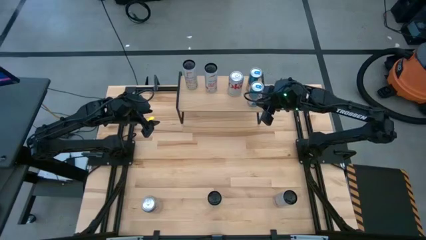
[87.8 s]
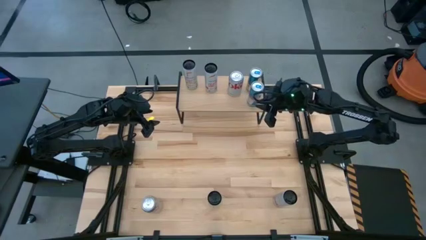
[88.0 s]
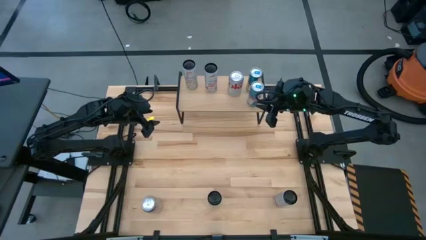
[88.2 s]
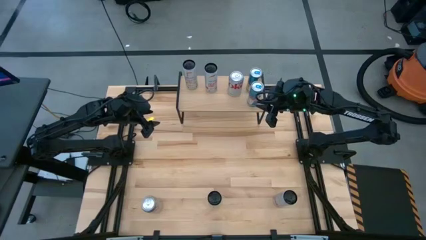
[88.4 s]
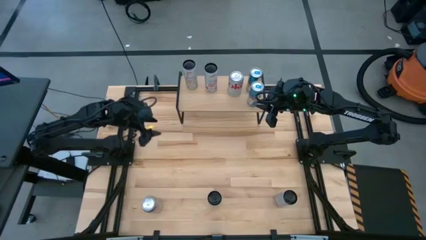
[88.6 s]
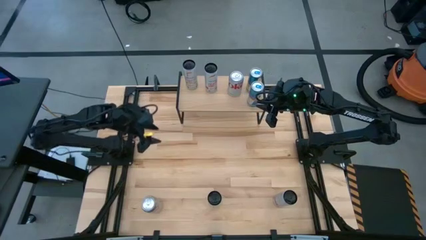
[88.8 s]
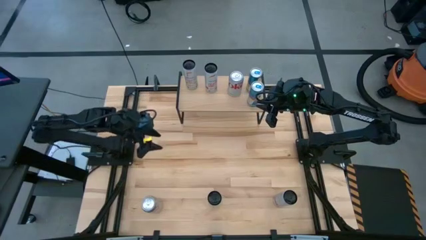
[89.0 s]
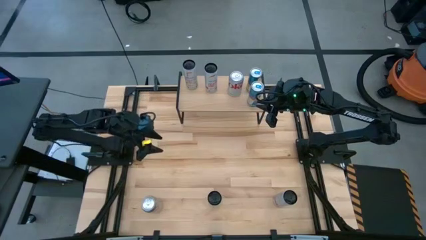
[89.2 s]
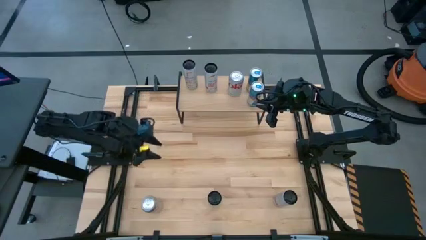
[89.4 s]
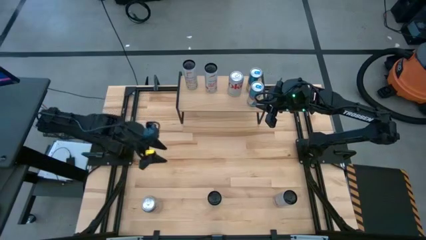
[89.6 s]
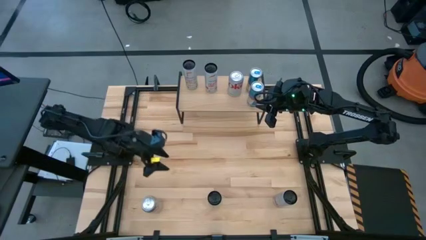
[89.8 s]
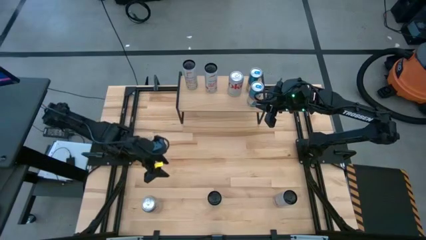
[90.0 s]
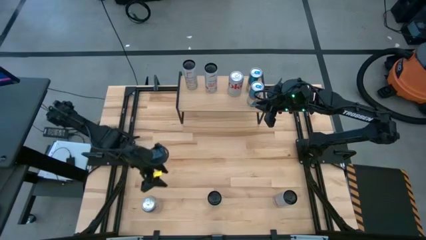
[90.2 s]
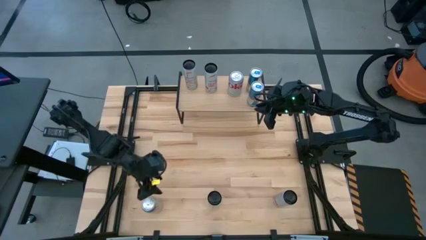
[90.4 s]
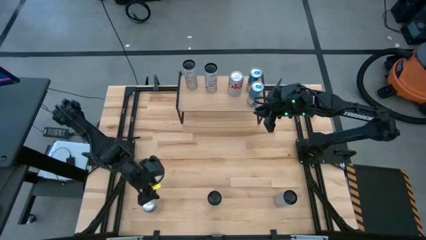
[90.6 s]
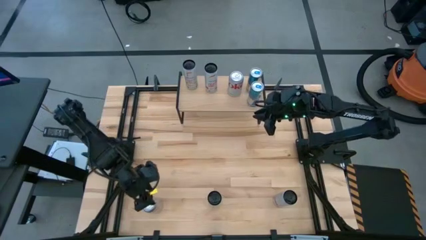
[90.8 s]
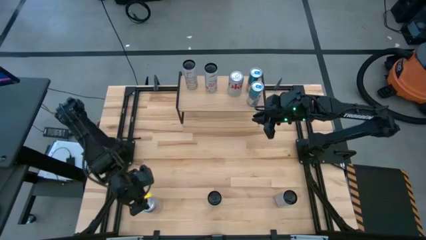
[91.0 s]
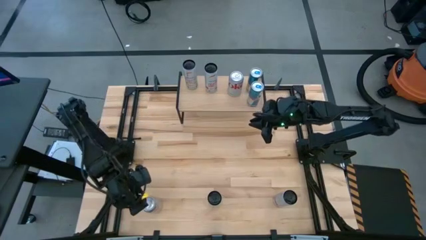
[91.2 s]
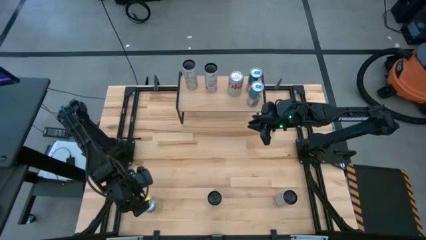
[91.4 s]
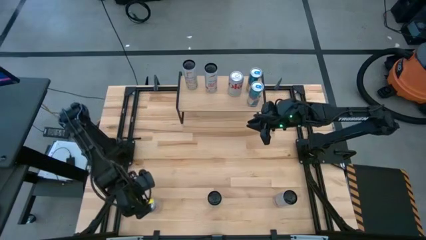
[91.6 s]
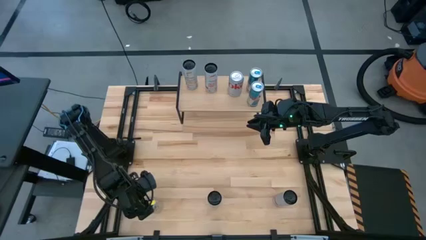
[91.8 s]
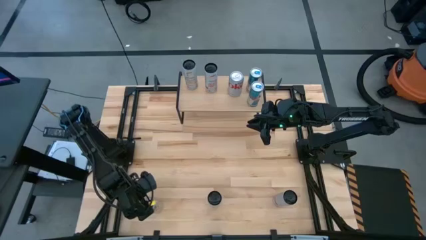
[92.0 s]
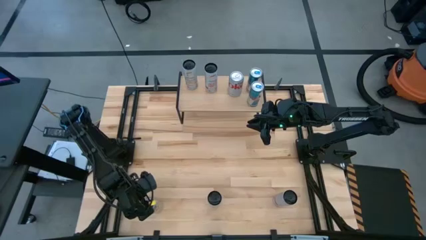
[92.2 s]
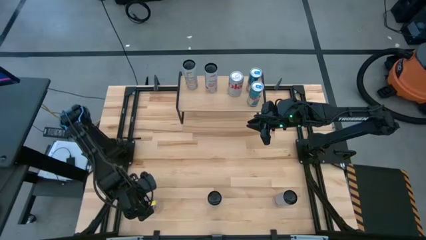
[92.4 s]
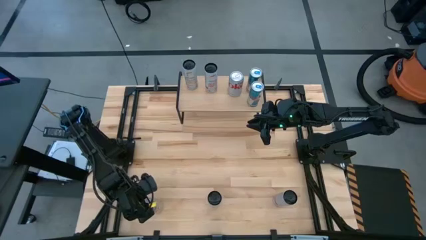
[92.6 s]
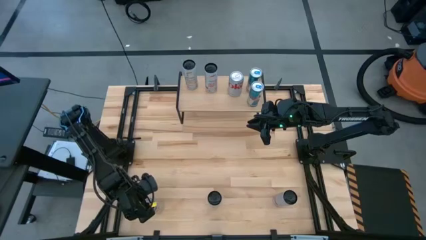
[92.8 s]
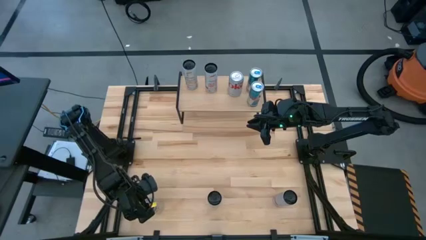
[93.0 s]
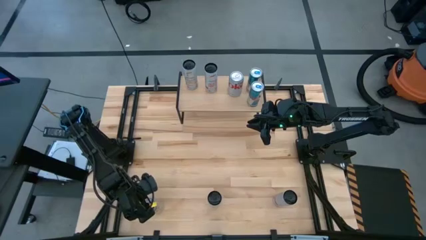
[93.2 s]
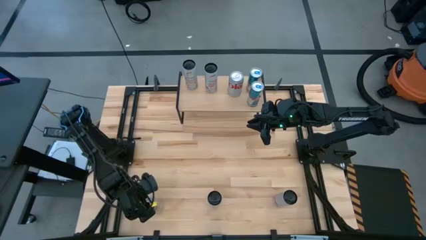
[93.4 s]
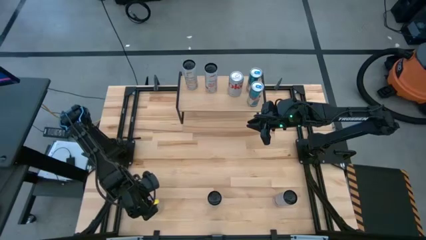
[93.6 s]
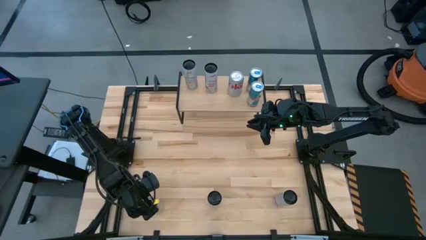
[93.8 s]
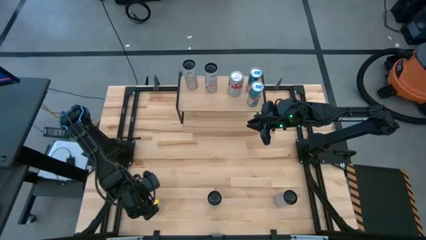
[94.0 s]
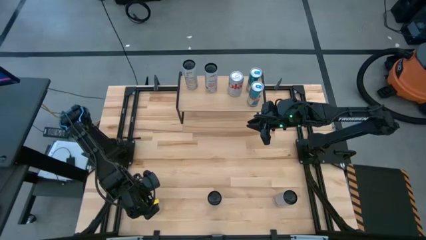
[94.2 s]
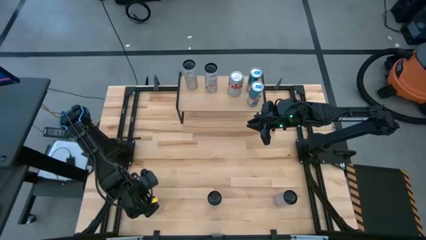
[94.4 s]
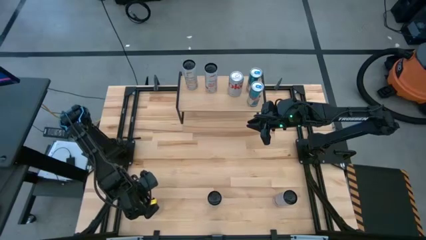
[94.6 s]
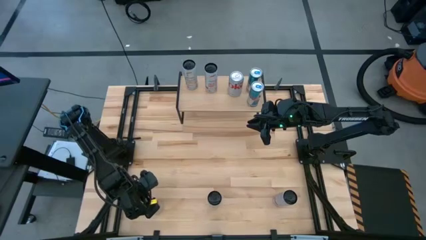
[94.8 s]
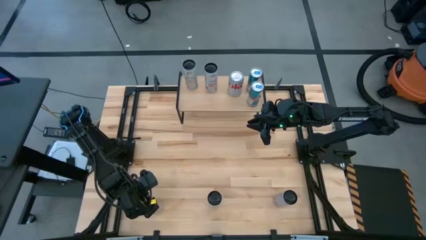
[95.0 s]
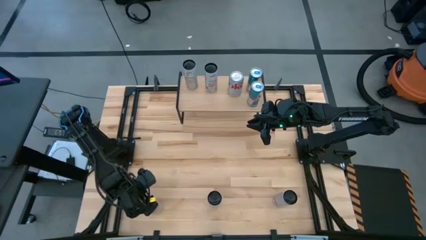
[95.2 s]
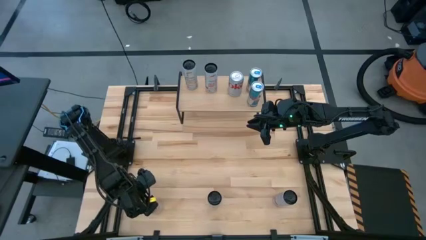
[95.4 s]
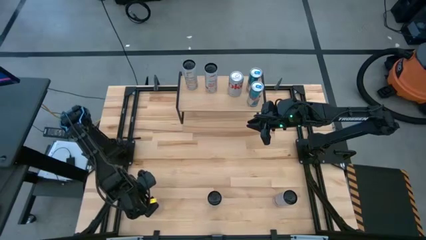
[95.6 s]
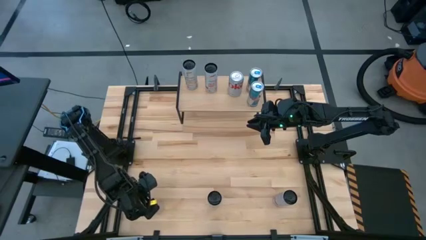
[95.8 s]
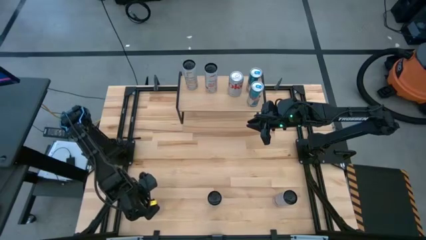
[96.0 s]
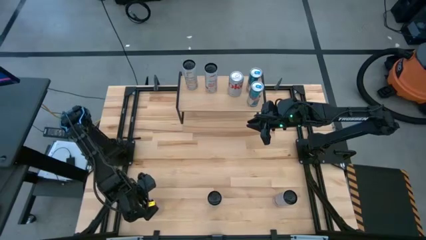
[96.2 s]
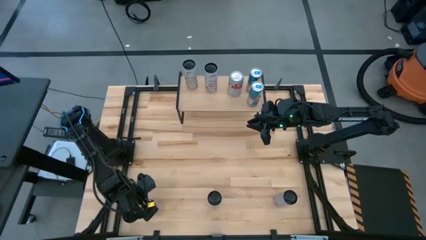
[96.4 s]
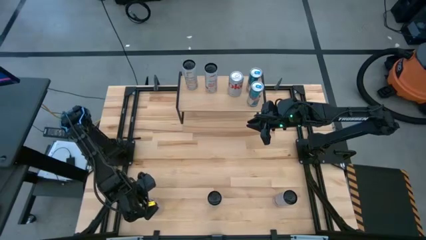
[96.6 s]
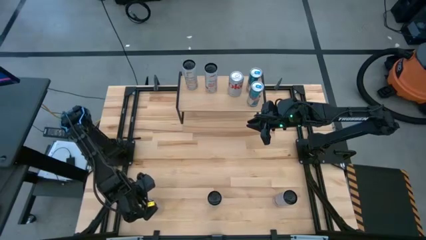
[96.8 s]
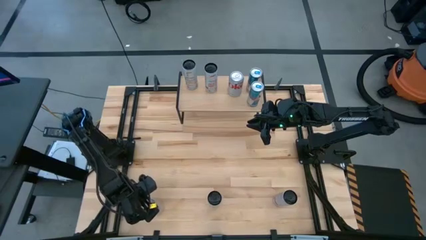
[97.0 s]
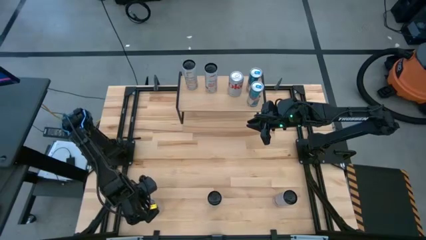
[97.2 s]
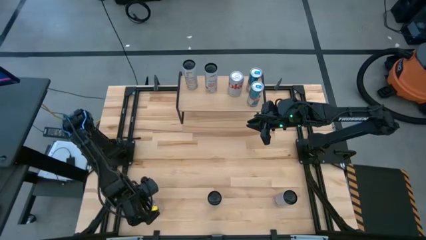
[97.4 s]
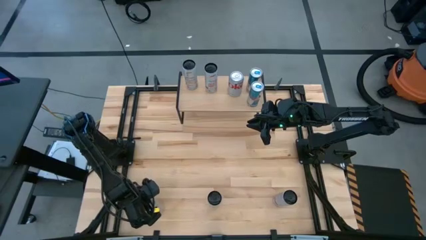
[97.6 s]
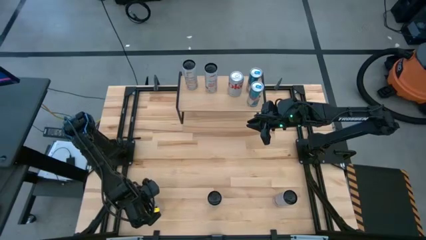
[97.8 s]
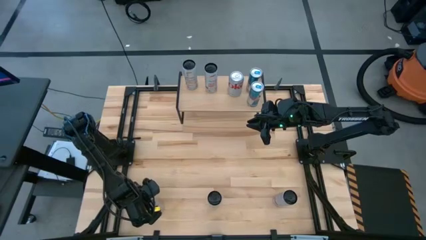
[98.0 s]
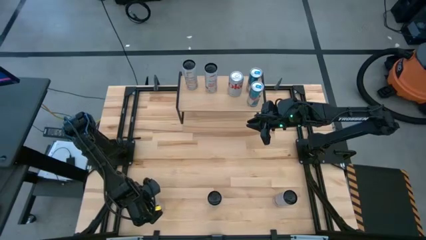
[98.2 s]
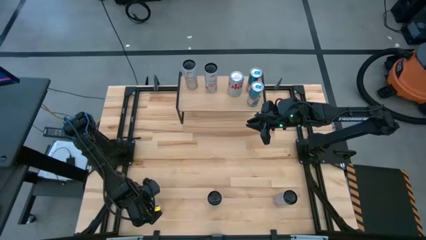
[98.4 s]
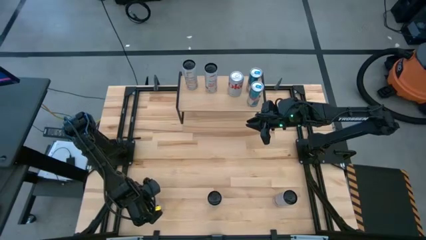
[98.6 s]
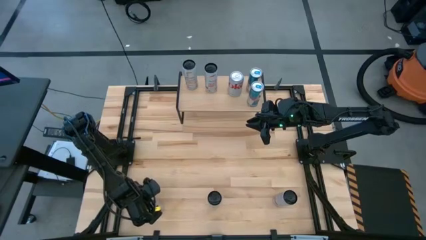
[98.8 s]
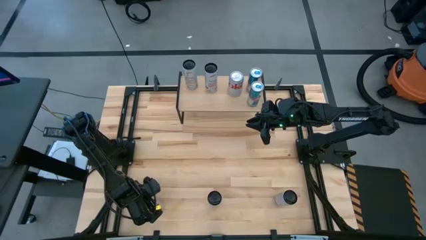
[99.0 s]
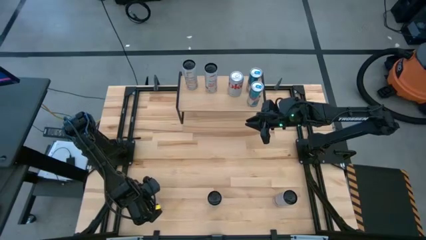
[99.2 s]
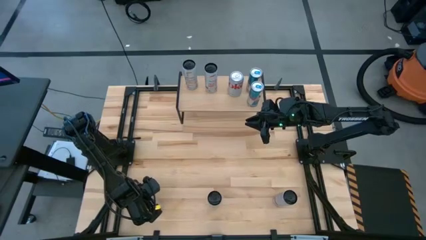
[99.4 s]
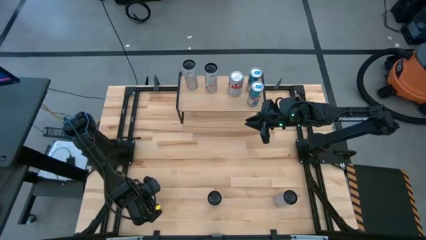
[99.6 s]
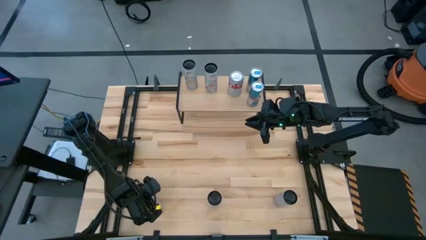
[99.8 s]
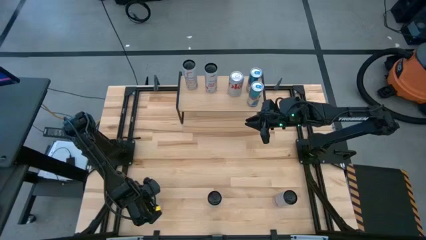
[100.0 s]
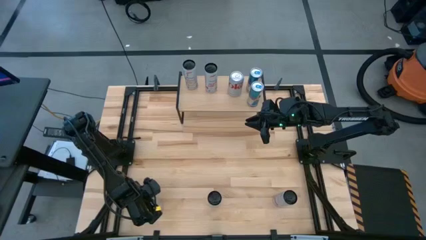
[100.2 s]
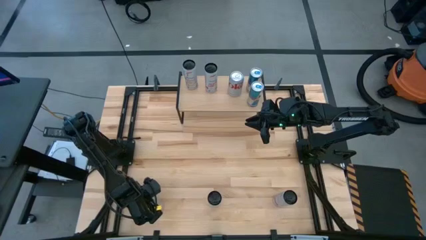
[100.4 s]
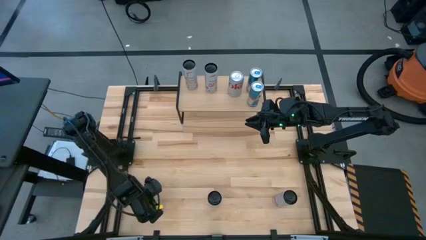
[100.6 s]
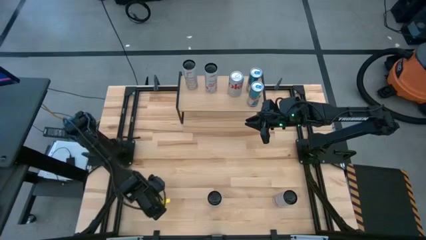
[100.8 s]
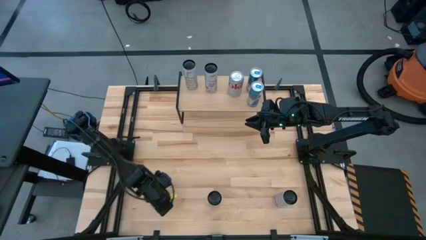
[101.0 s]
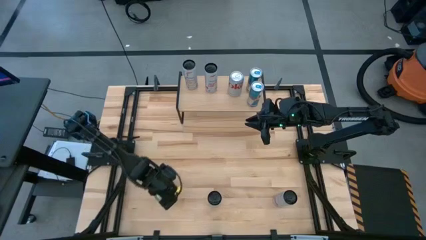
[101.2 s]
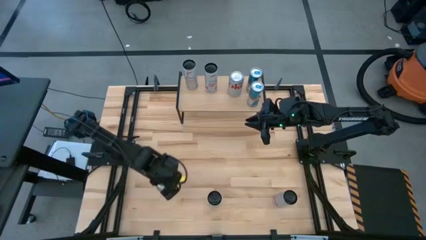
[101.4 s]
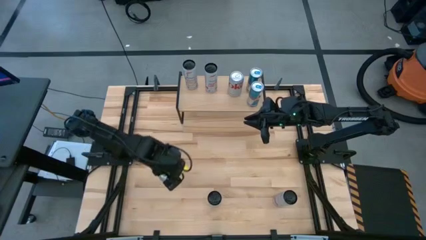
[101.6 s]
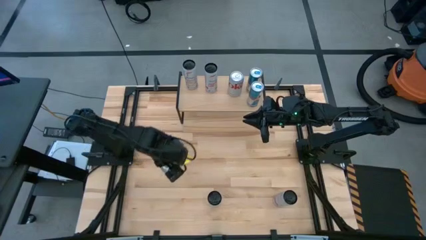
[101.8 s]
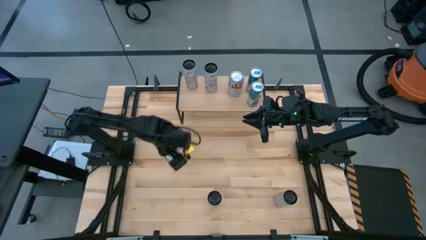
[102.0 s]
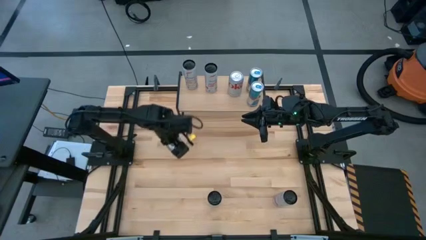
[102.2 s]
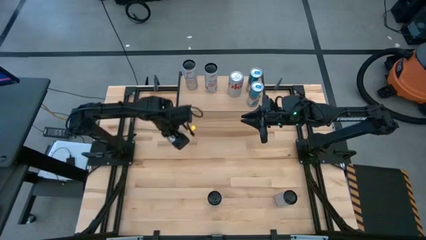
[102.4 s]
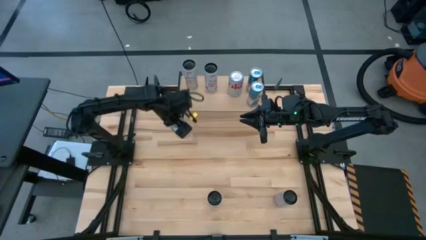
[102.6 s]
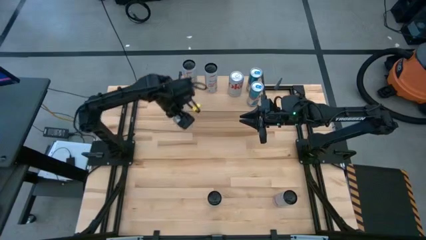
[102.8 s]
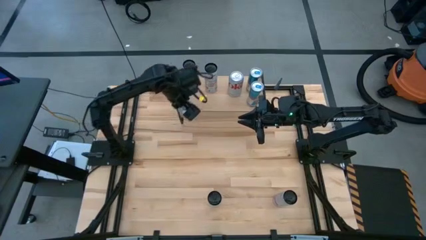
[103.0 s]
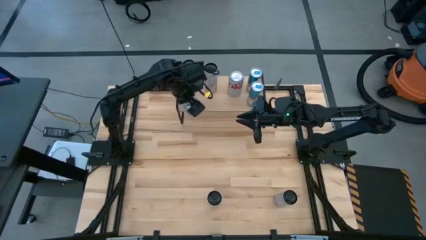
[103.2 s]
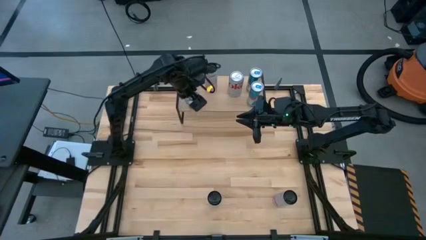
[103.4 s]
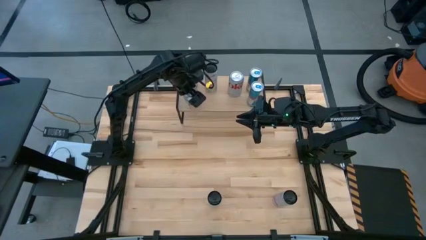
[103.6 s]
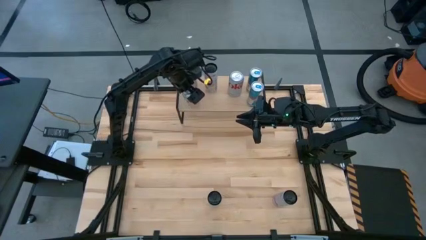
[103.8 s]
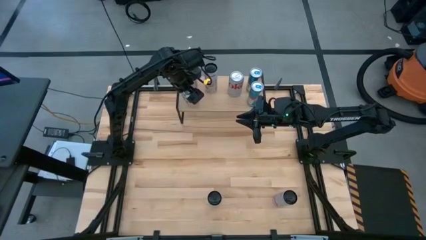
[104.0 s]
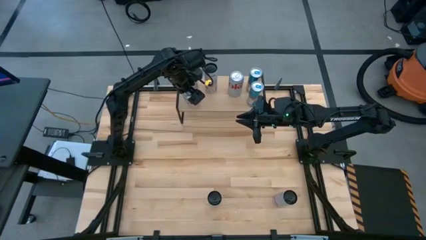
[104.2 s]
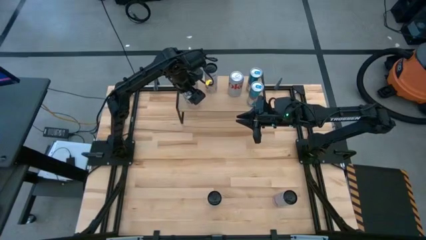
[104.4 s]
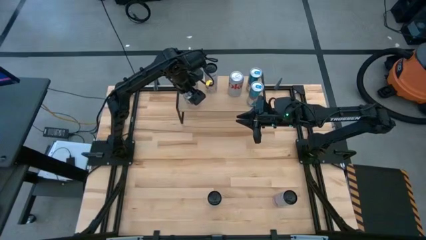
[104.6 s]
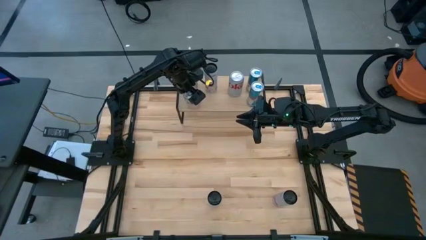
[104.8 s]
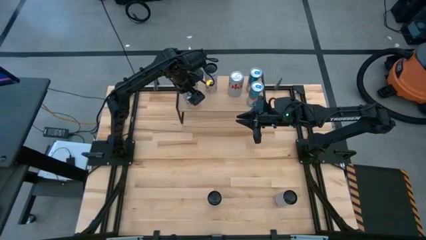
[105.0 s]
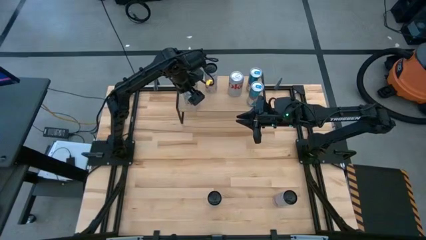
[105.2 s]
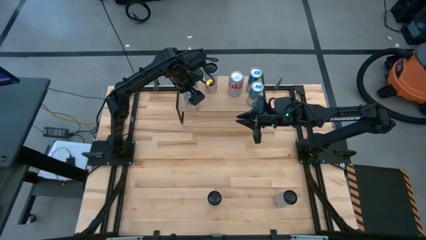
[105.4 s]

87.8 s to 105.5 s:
Task: Place canned beverage on shelf
Put the red soda can aligned with the other red soda can on the shelf
